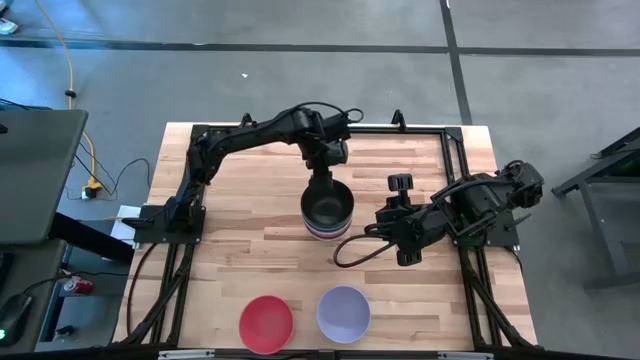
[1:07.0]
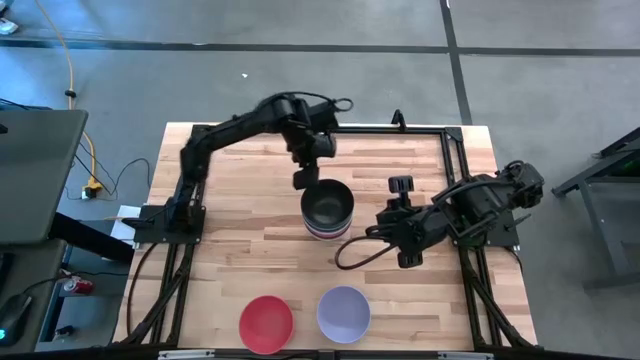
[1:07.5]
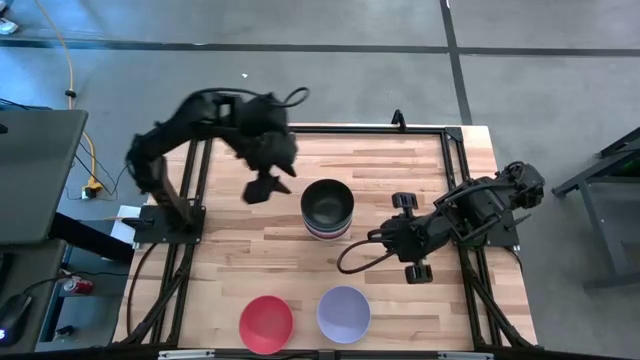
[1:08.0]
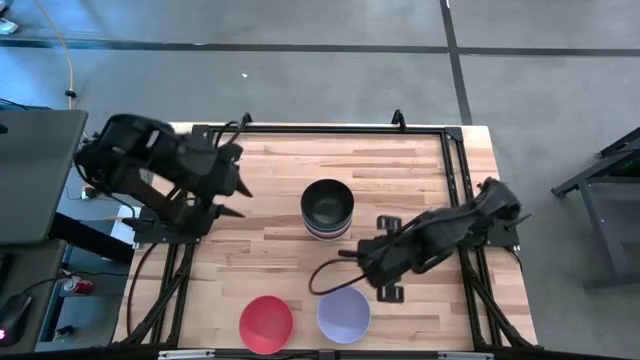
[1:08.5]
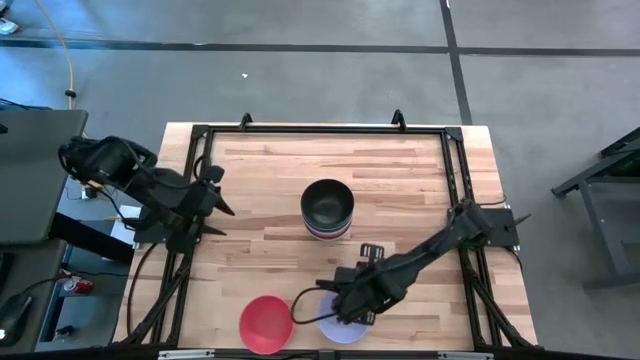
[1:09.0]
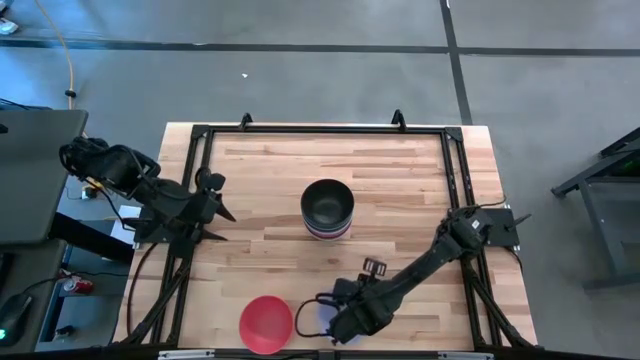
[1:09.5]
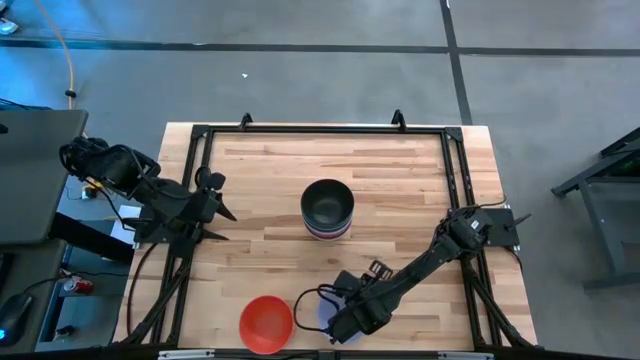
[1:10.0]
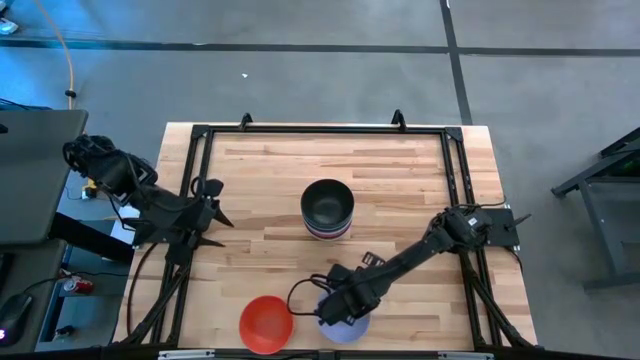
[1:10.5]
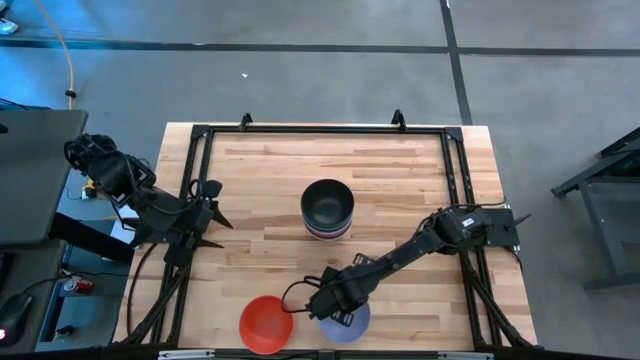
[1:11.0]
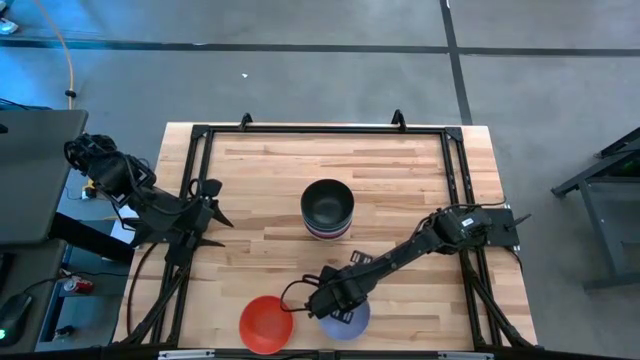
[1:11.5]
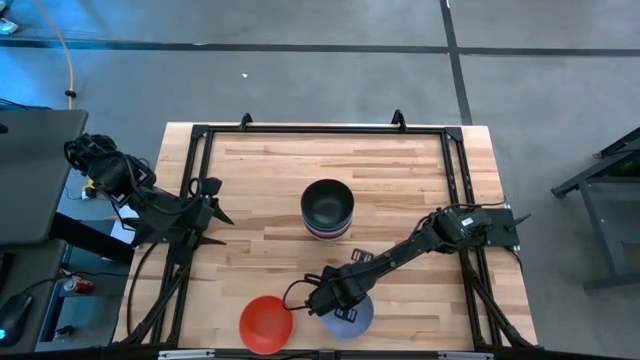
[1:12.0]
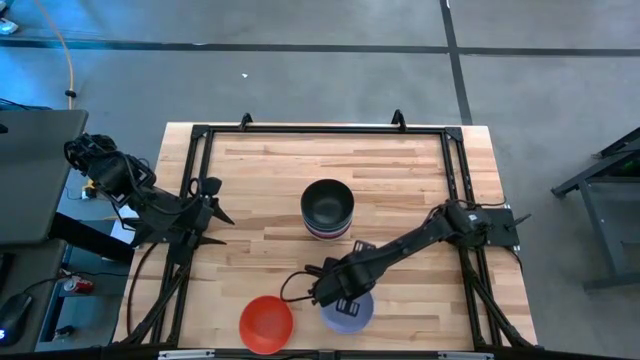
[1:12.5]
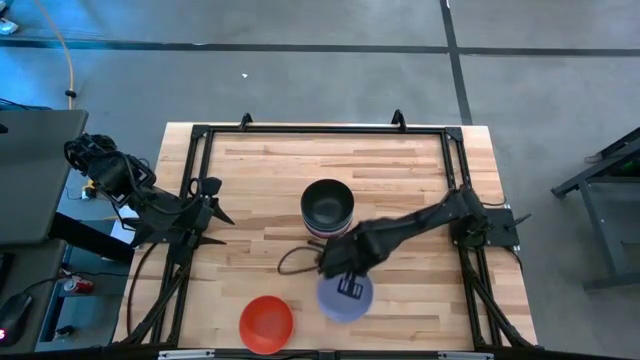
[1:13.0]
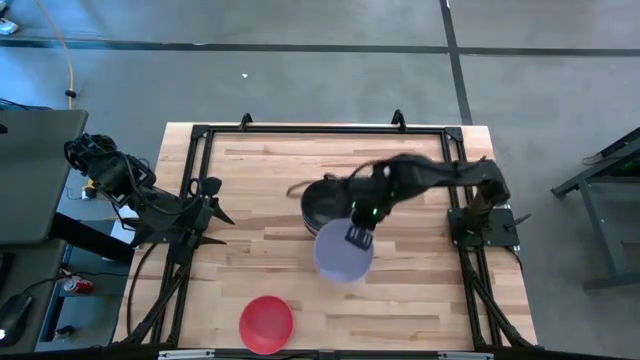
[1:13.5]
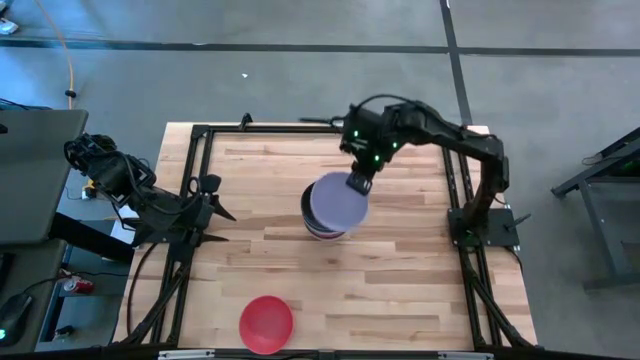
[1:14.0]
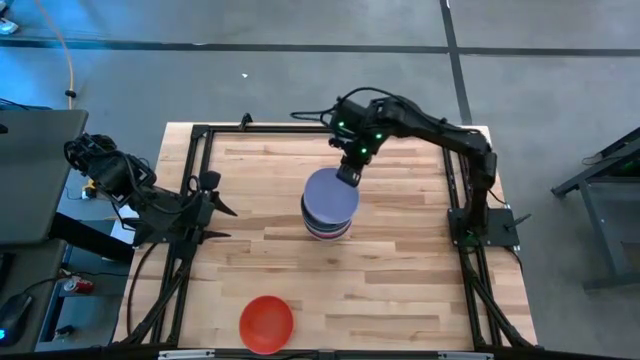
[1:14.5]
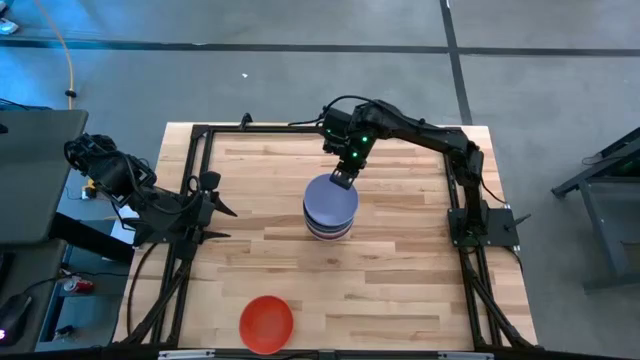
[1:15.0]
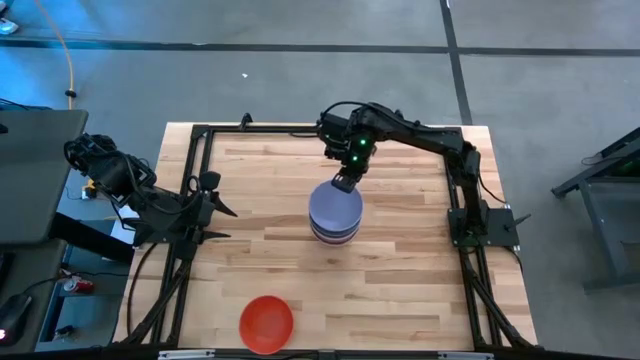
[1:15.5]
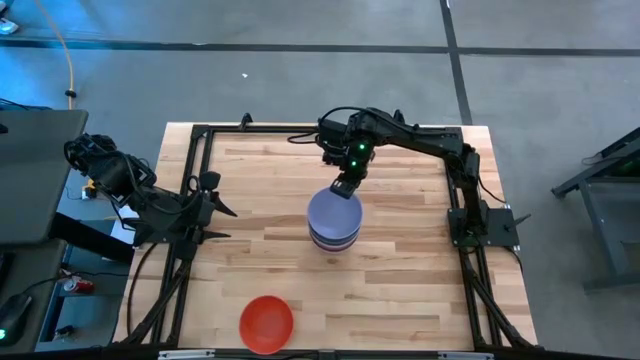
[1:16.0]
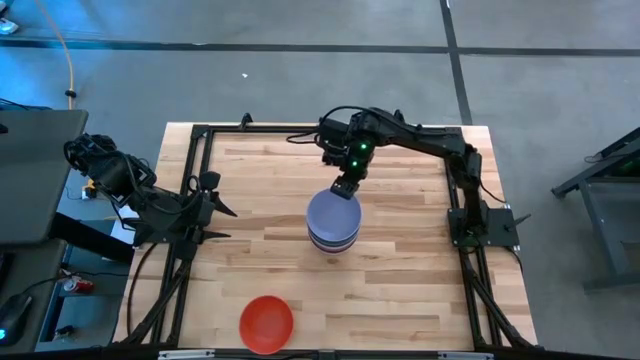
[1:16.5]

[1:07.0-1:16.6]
Task: Nest bowls inside each other
Stack the purple bowl on top of the black bowl

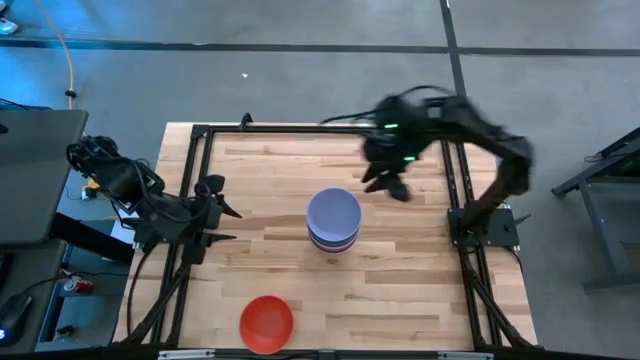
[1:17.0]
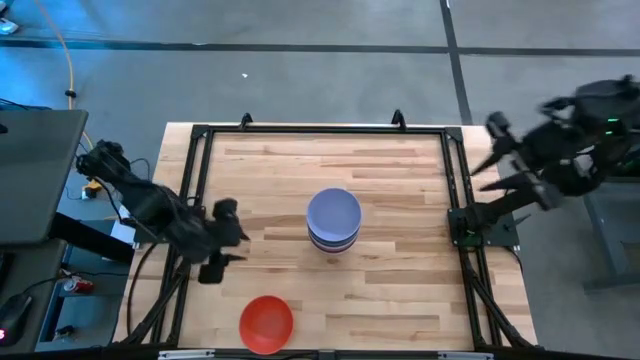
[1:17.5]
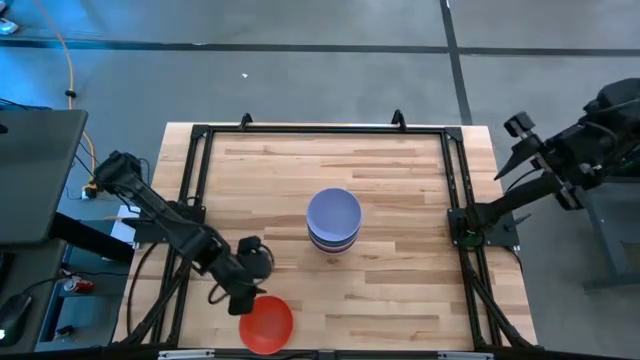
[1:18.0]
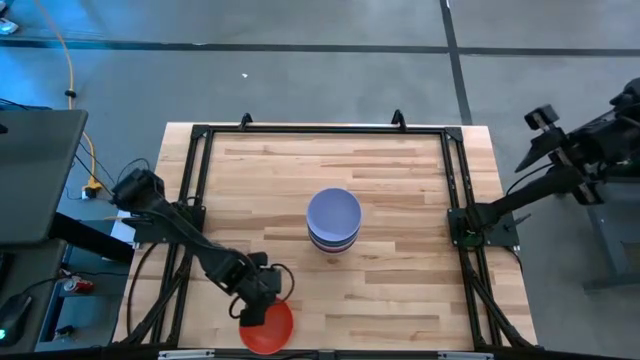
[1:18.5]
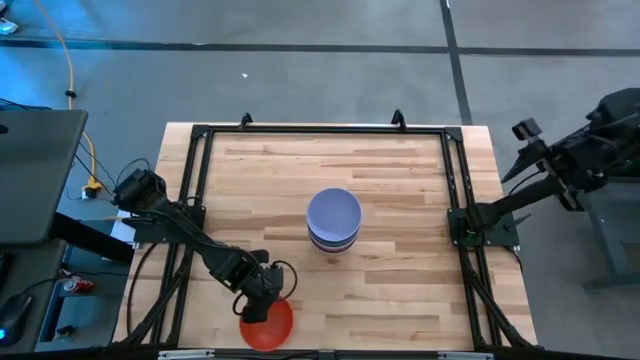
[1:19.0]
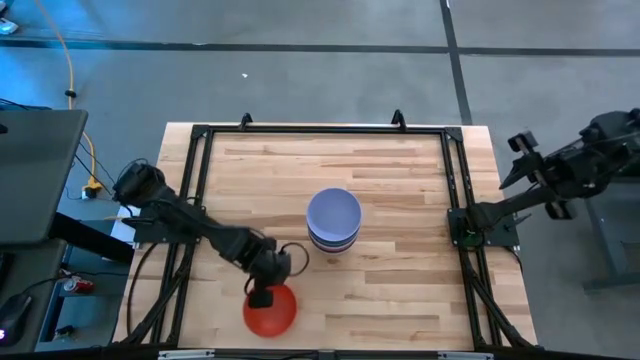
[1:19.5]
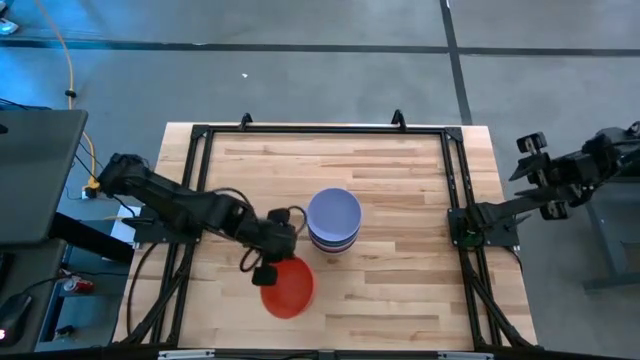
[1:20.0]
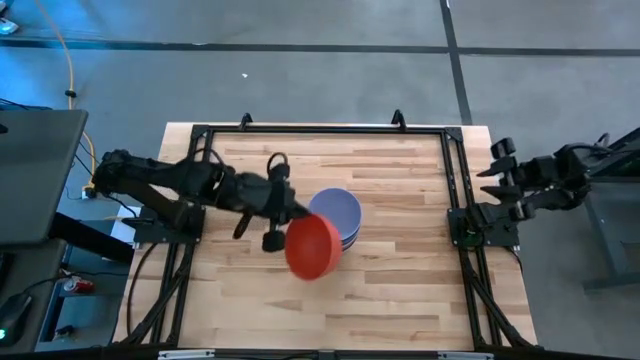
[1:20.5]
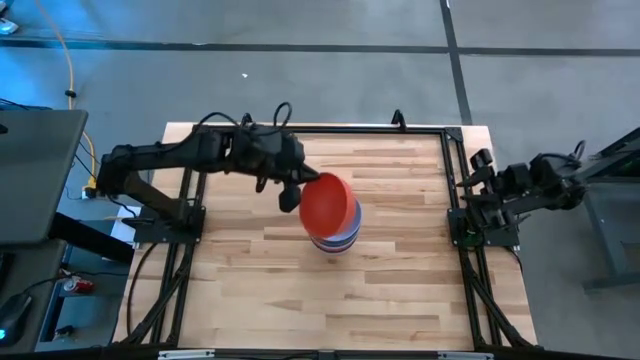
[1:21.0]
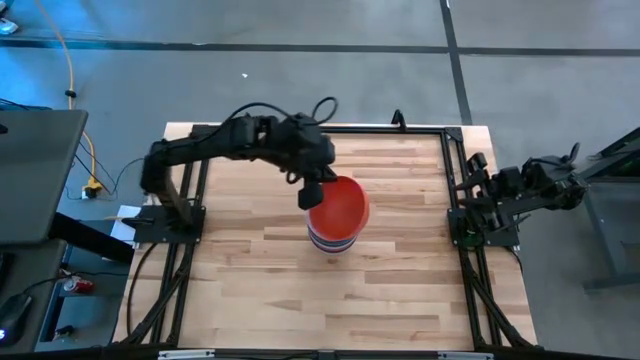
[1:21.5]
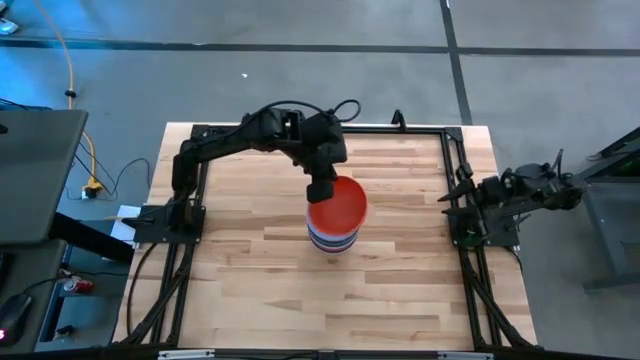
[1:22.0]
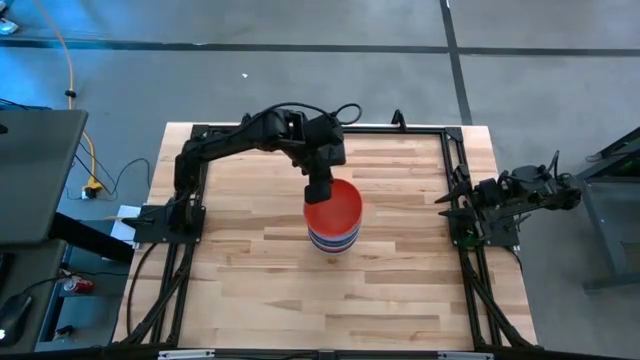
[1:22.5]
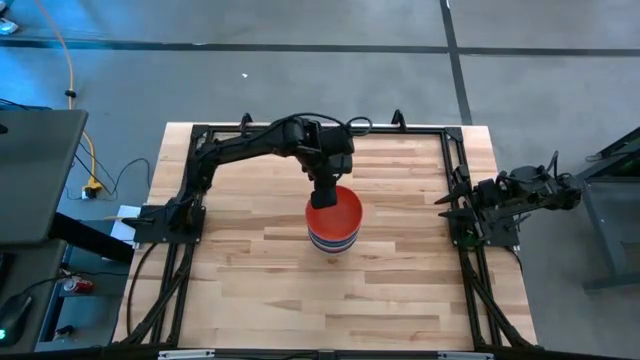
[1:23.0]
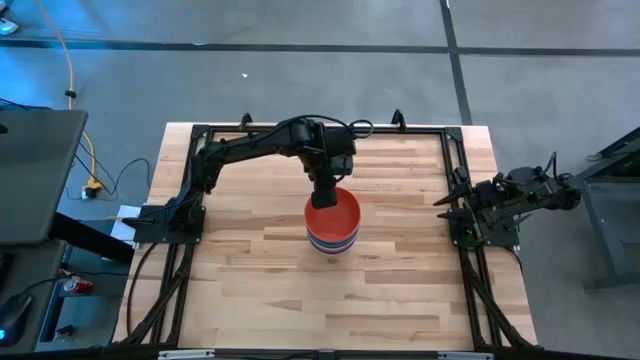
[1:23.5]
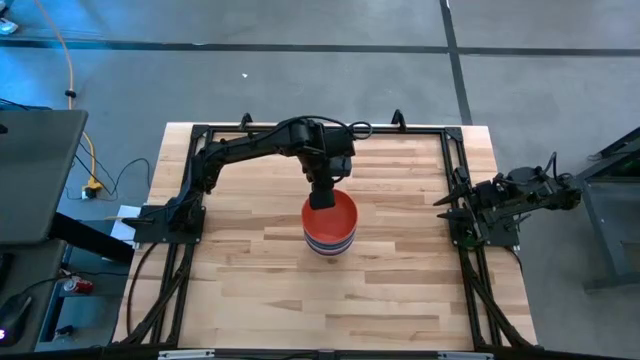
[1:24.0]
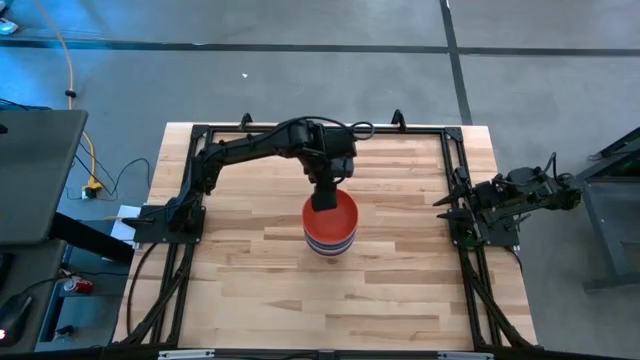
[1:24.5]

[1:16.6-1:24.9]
Stack the orange bowl on top of the purple bowl

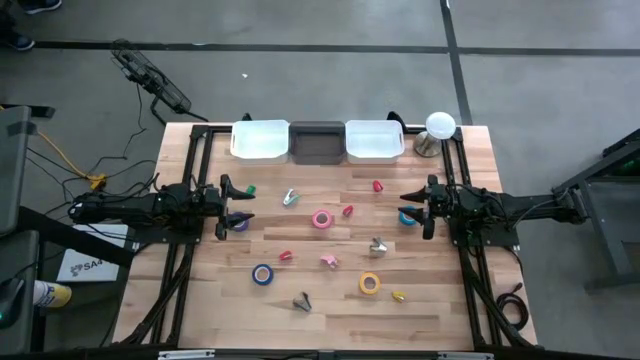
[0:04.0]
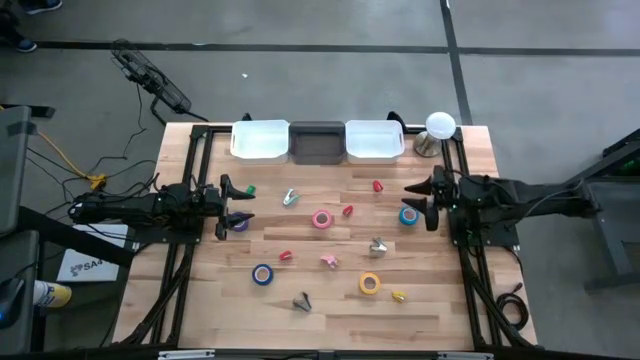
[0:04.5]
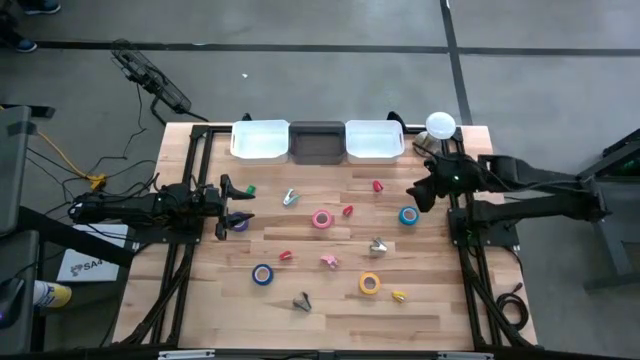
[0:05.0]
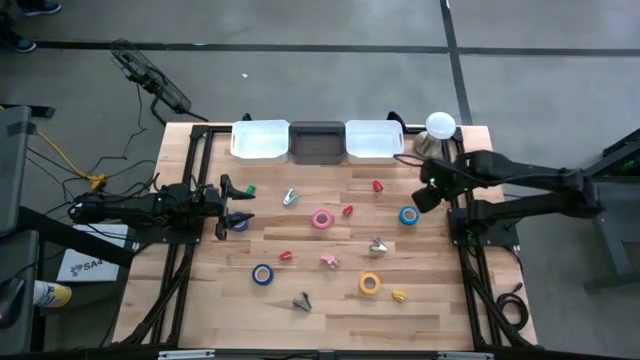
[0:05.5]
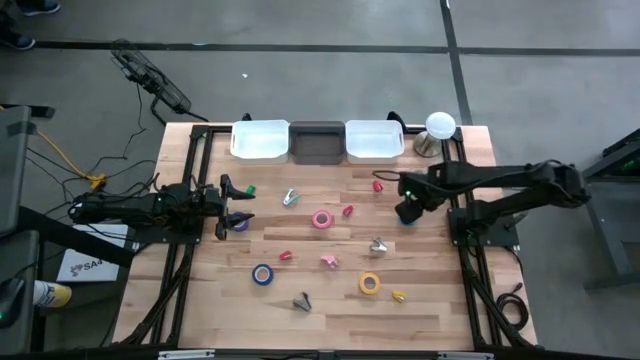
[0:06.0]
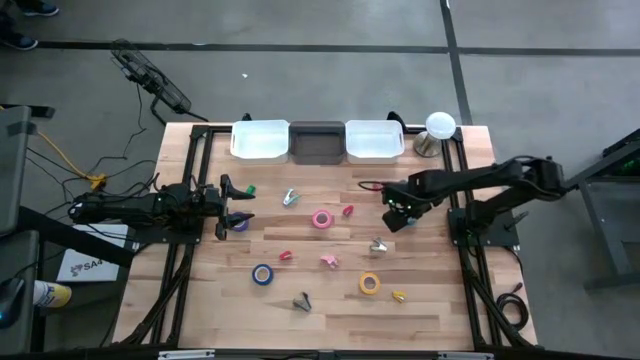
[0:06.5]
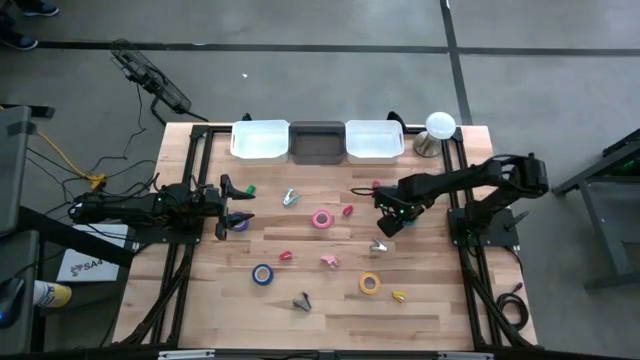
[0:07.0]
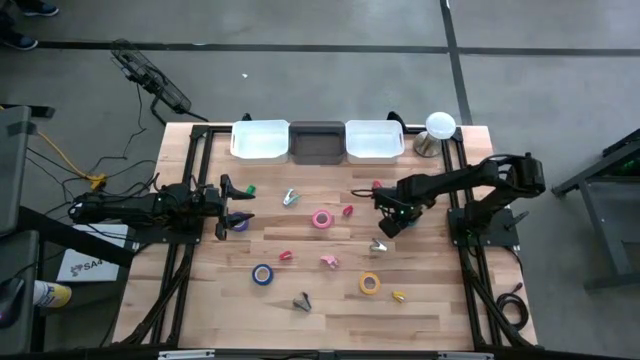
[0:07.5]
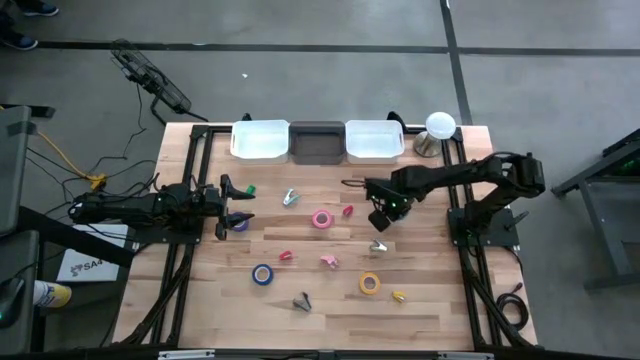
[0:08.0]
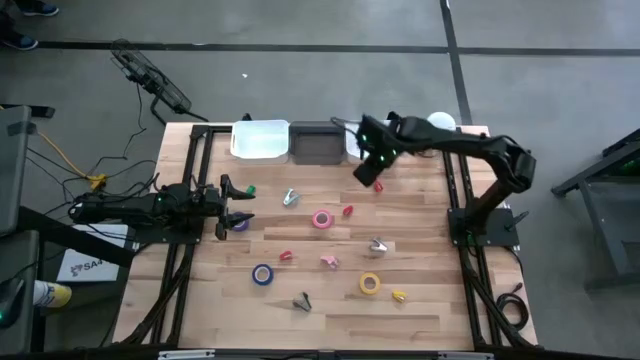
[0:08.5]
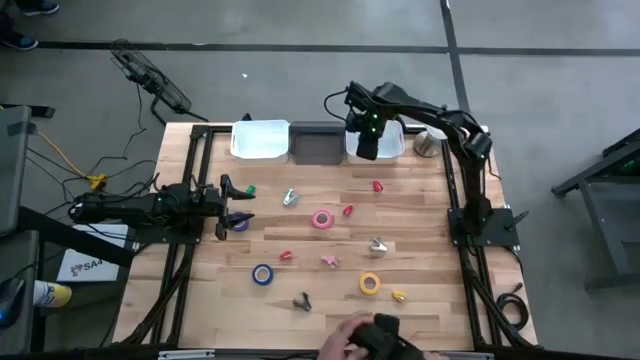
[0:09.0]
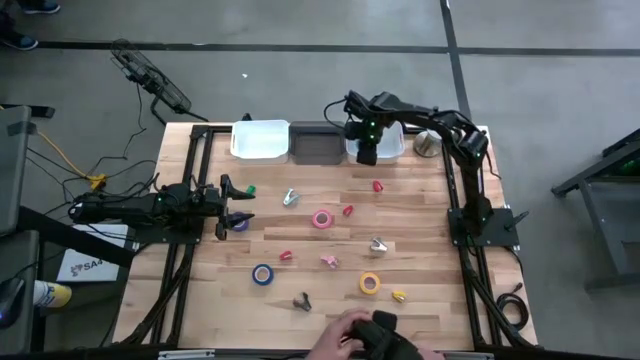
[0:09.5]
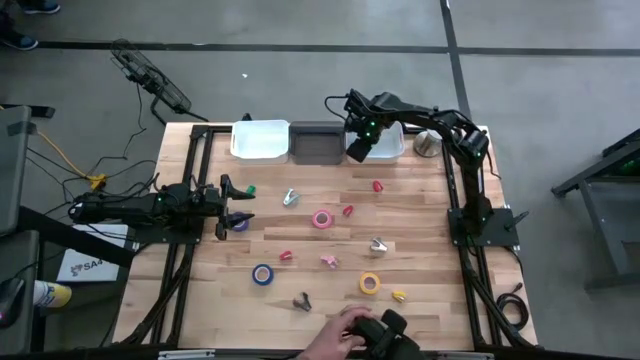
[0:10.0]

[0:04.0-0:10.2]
Task: Pick and place Stapler, Stapler remover, tape
Put the light blue tape into the right white bin
